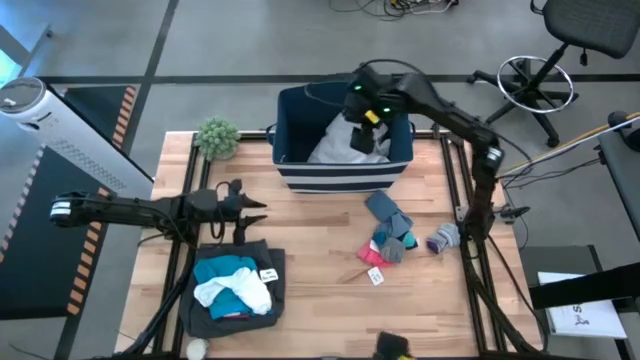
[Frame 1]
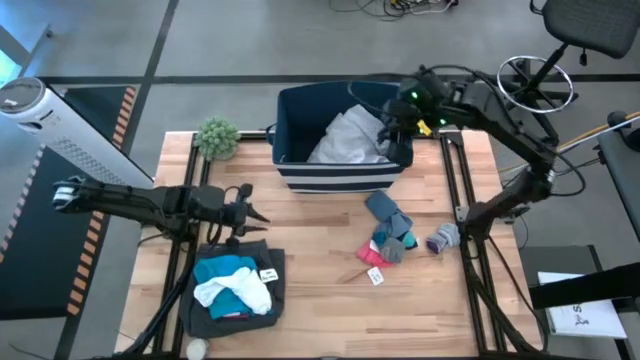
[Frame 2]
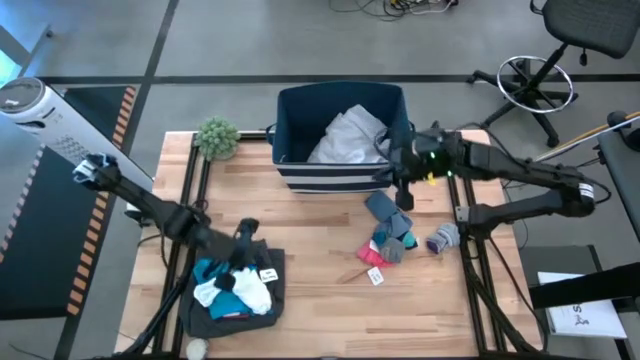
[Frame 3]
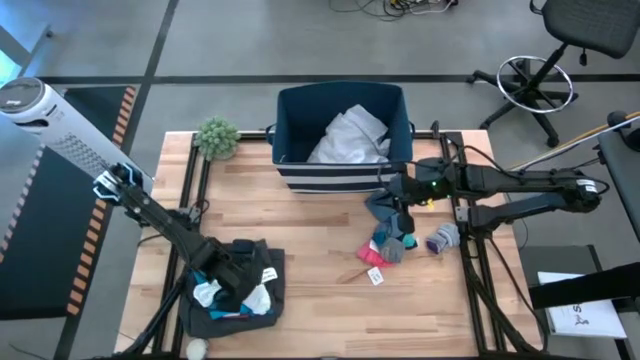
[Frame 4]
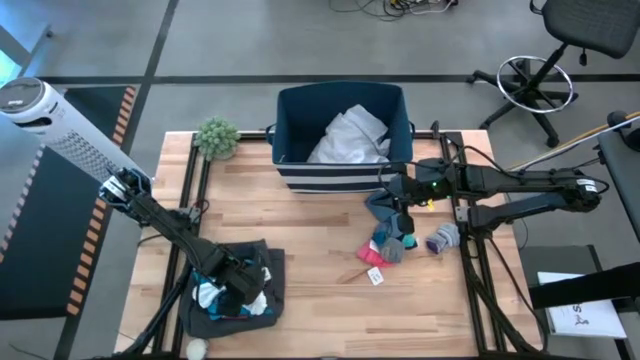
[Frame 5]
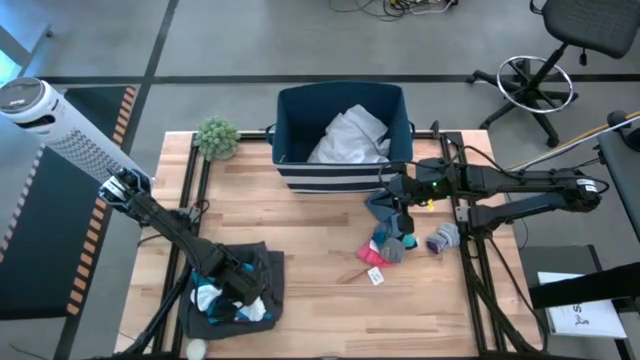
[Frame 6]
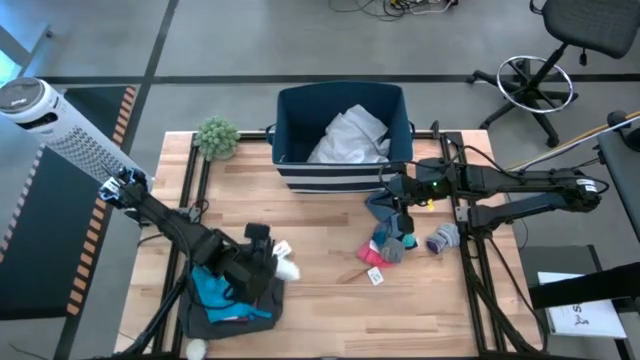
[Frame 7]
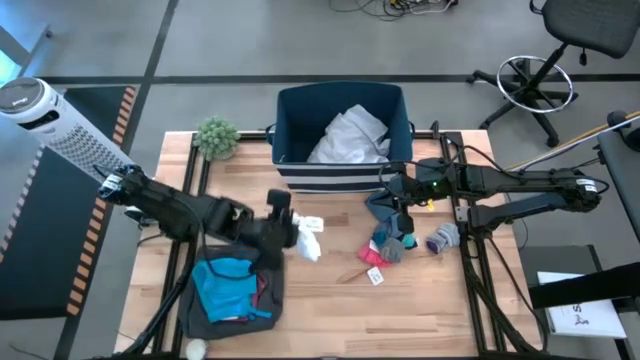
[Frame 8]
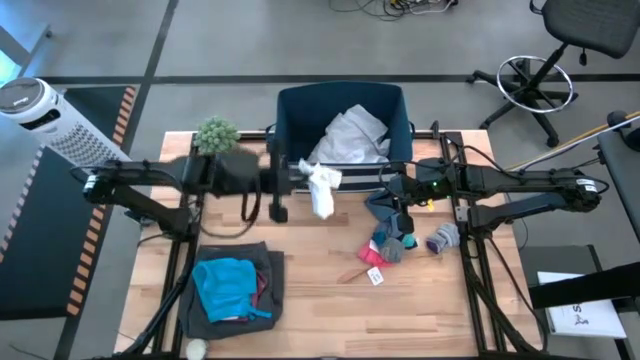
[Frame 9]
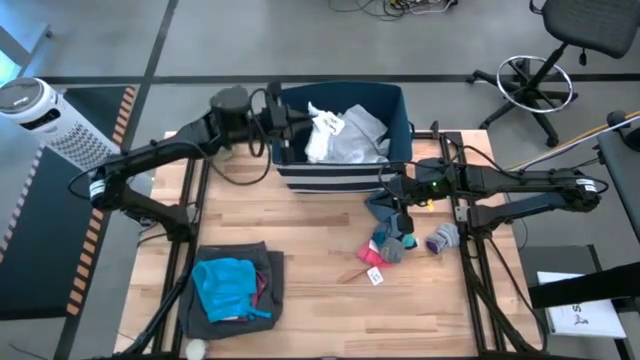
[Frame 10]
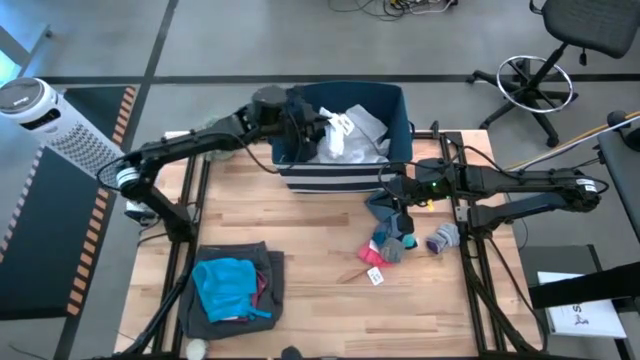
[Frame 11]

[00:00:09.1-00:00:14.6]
Task: Sort clothes
Put the white socks into the laundry bin

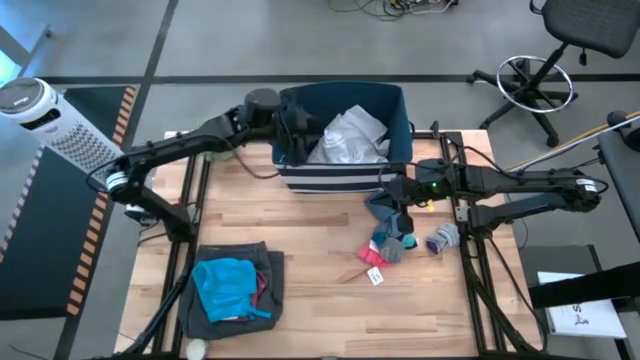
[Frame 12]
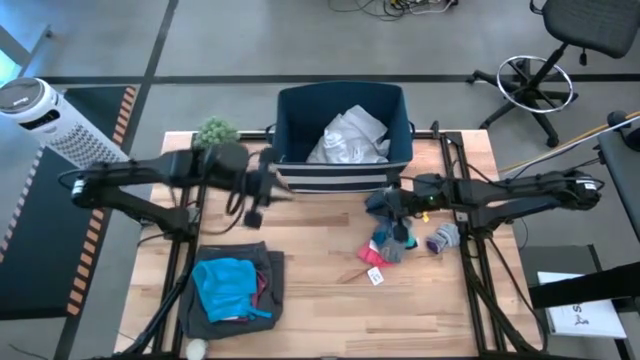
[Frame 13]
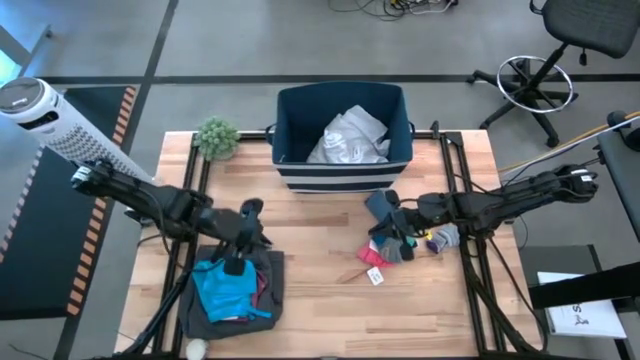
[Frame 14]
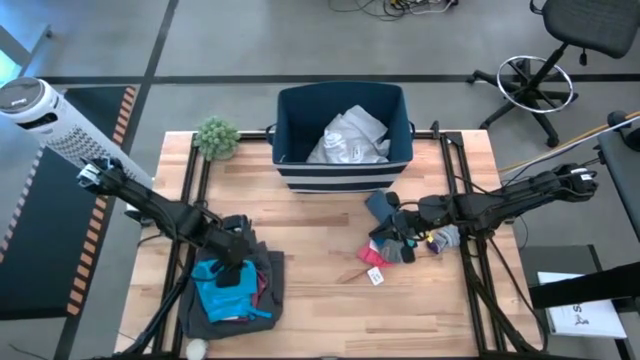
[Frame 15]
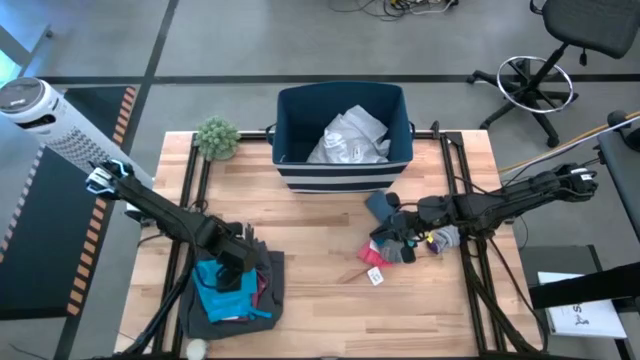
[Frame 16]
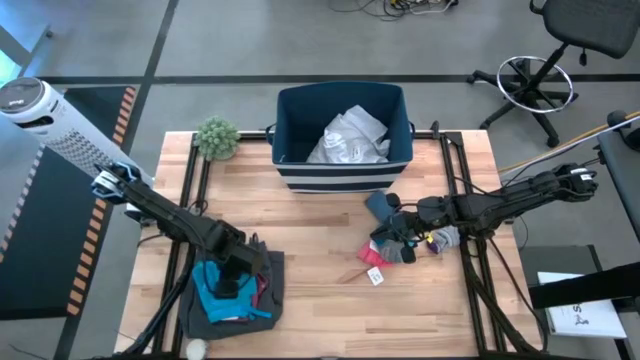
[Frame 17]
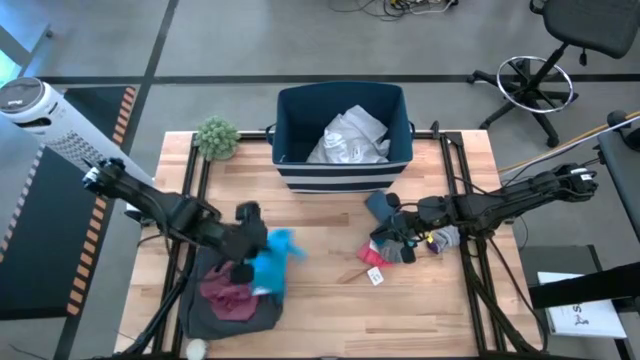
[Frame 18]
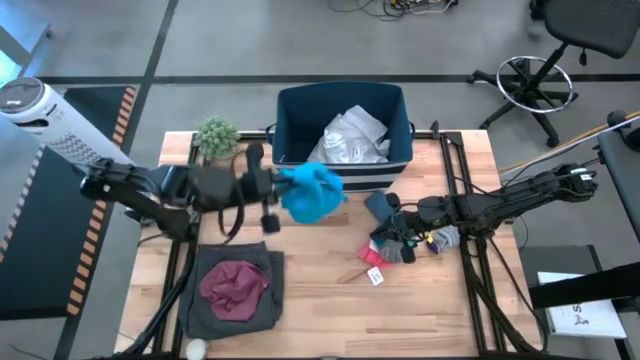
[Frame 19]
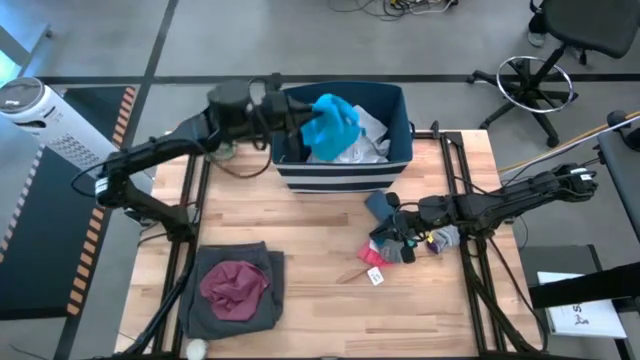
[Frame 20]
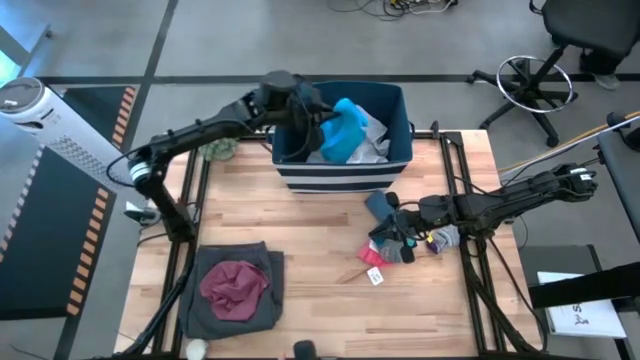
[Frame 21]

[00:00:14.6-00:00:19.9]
Put the blue cloth into the laundry bin

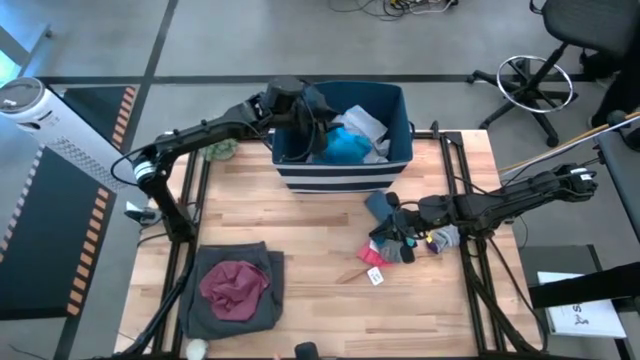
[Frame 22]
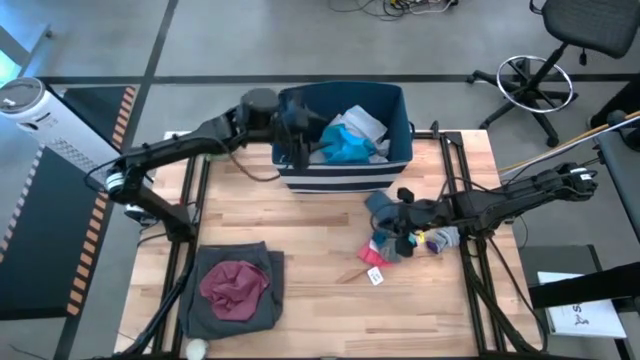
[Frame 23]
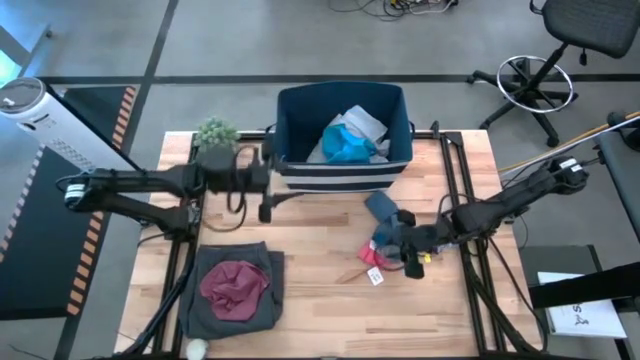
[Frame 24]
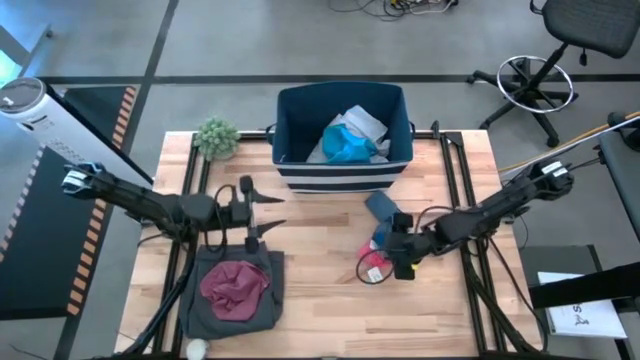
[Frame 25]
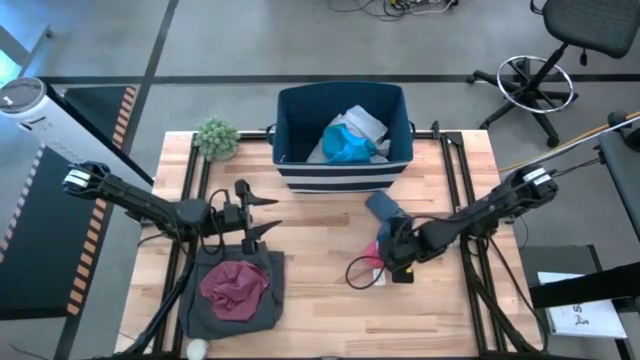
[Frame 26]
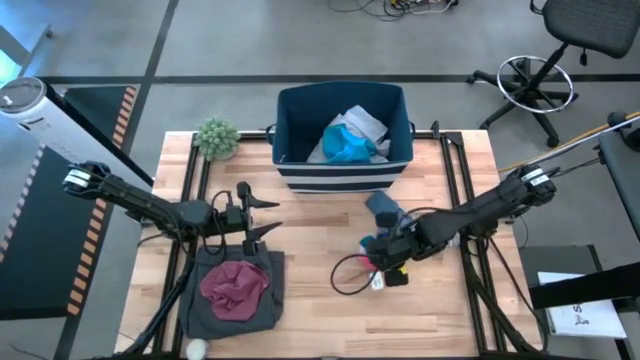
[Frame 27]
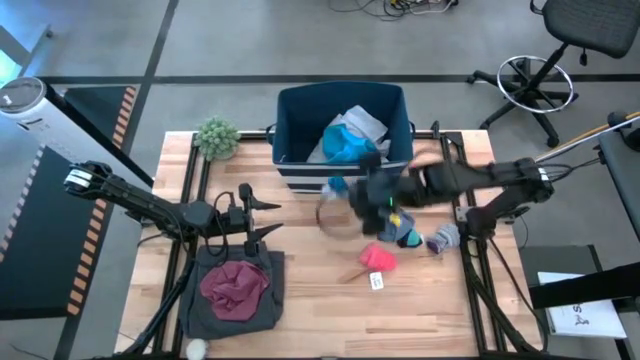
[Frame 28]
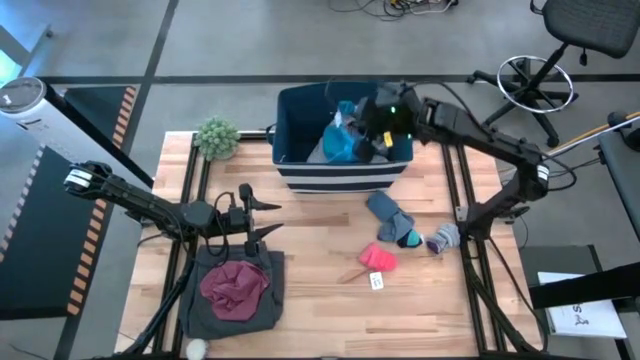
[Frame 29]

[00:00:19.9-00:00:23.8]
Put the blue socks into the laundry bin

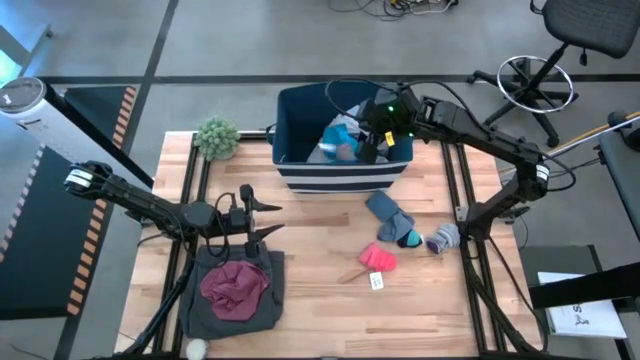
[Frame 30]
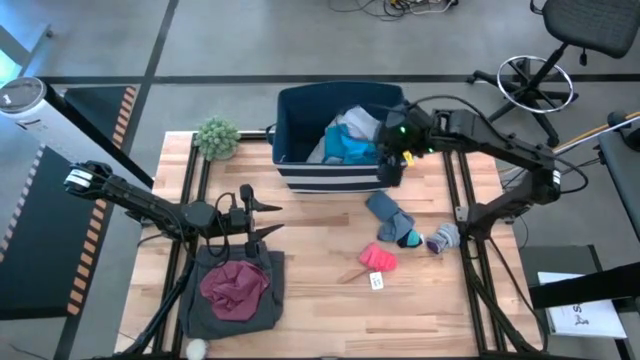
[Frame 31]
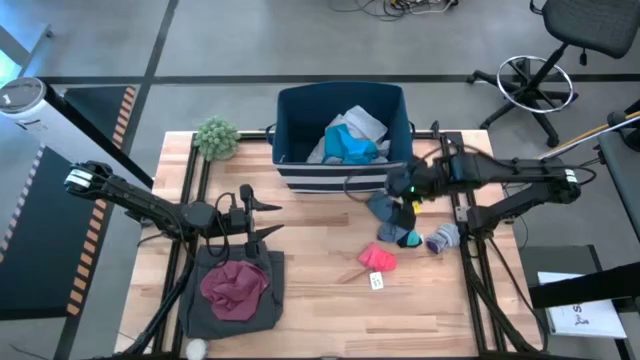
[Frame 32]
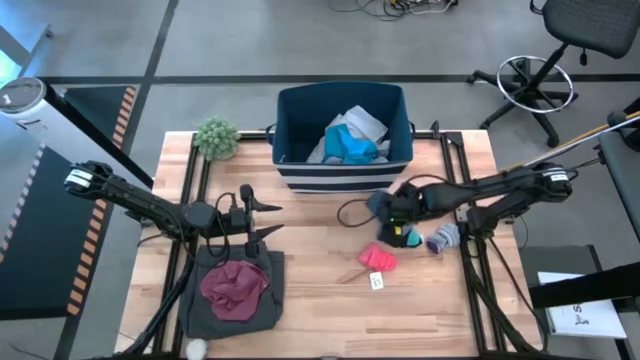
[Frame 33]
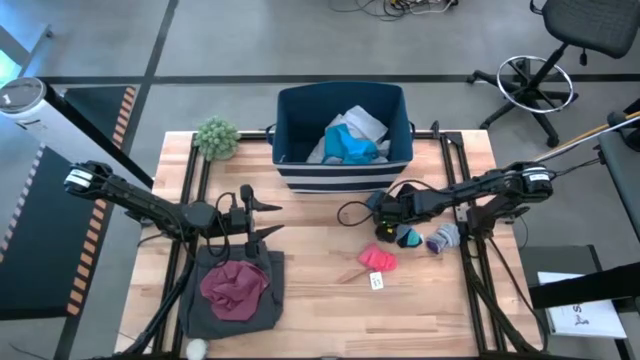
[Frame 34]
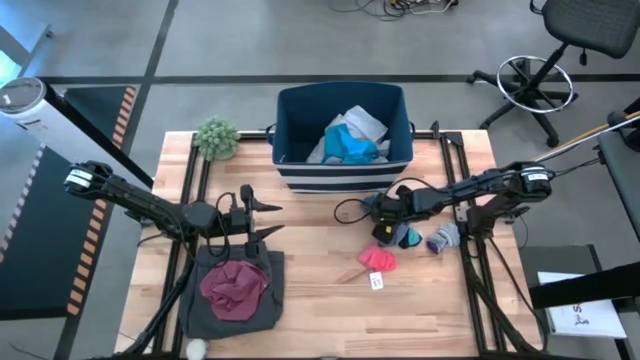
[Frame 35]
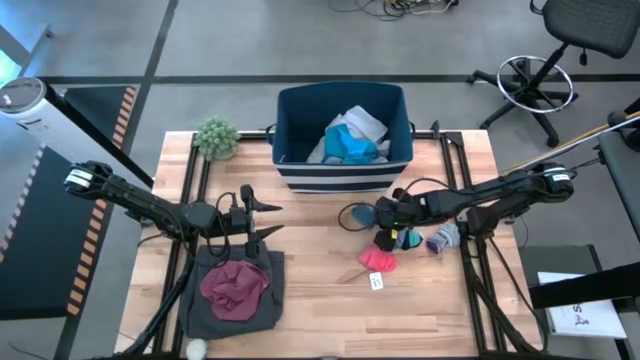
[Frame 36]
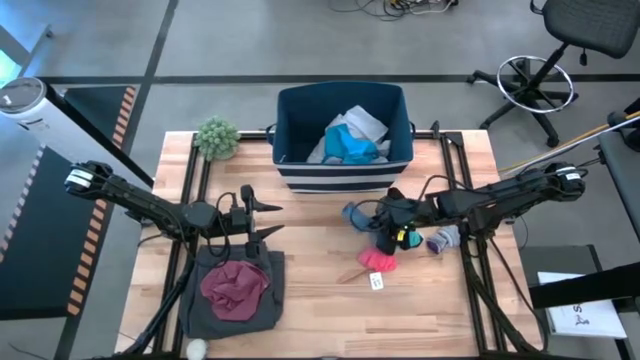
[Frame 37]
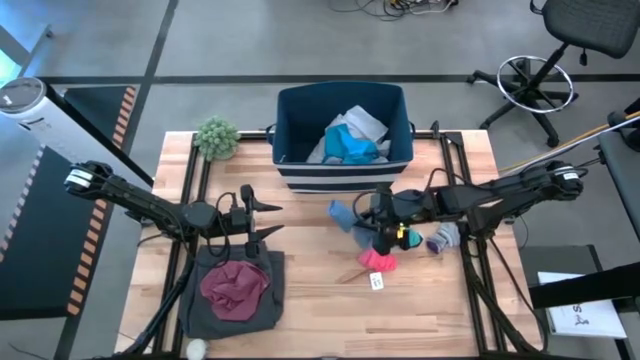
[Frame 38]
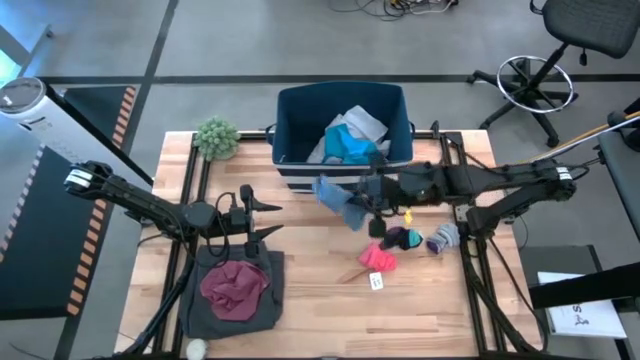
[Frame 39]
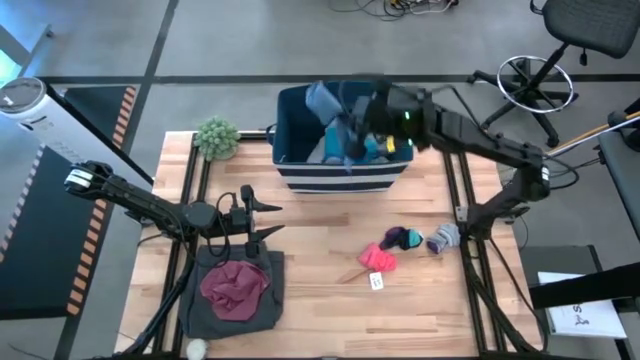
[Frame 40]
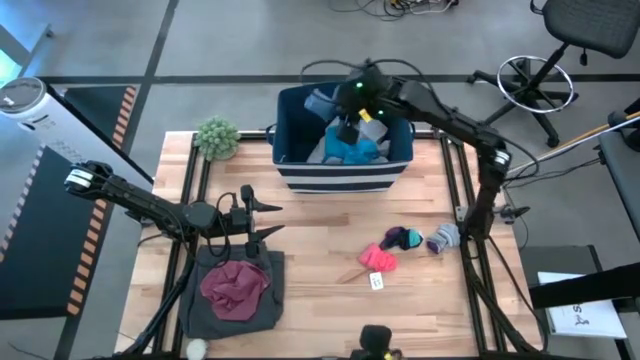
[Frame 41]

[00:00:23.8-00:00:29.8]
Put the dark blue socks into the laundry bin
